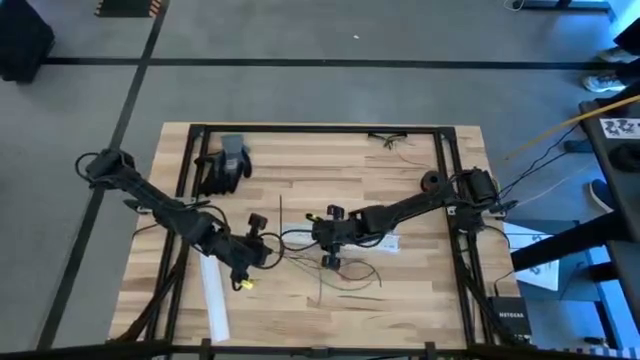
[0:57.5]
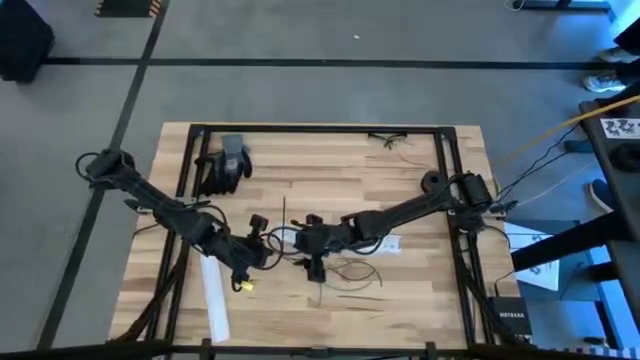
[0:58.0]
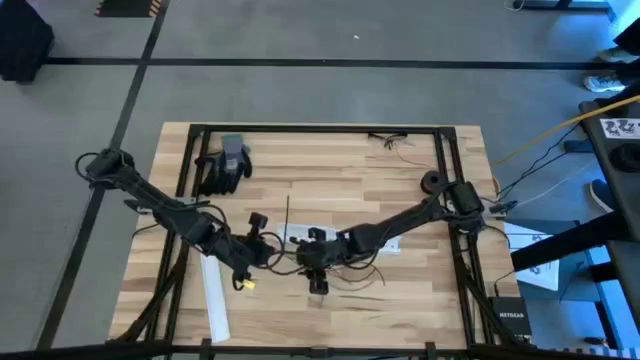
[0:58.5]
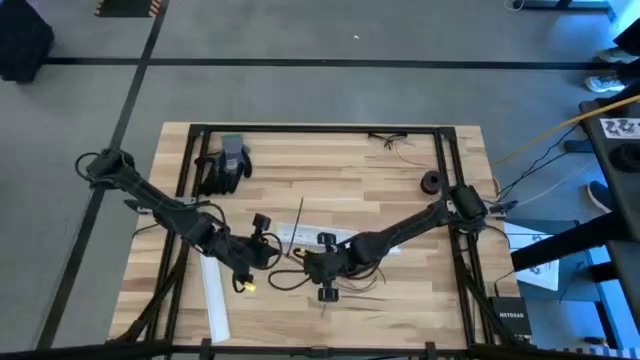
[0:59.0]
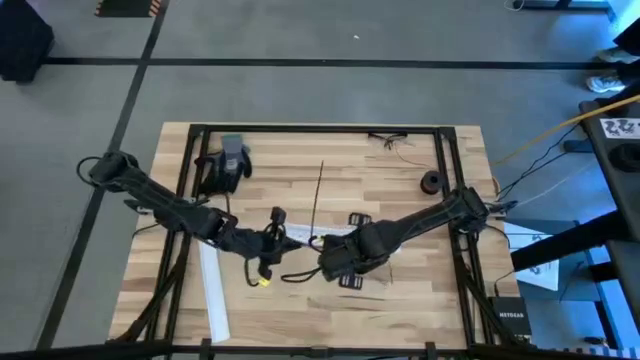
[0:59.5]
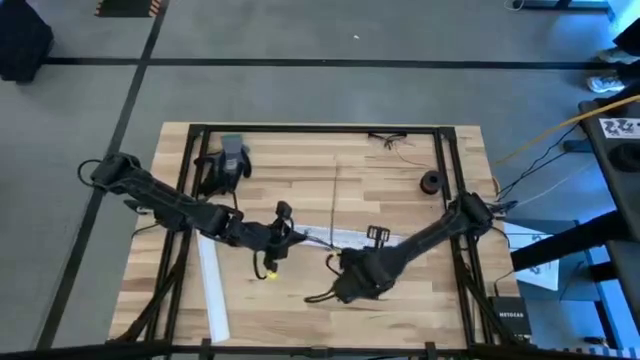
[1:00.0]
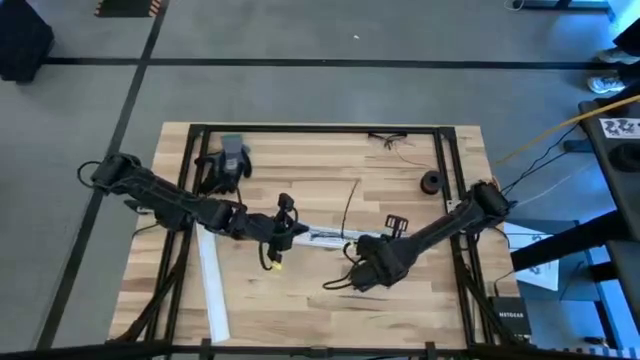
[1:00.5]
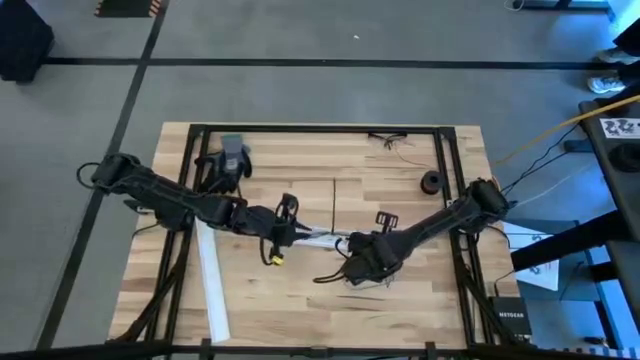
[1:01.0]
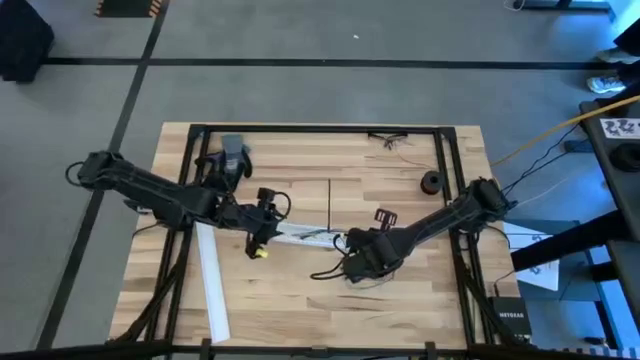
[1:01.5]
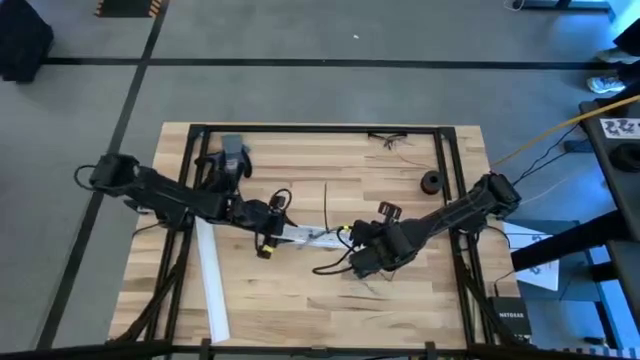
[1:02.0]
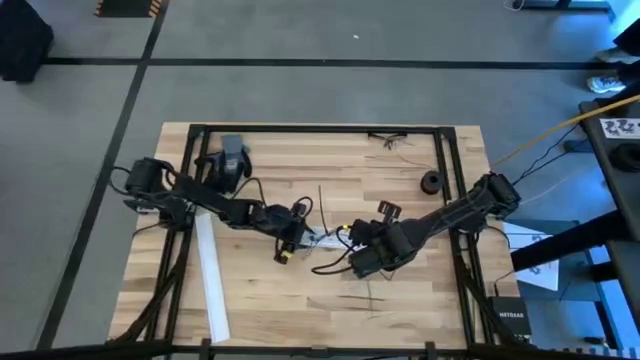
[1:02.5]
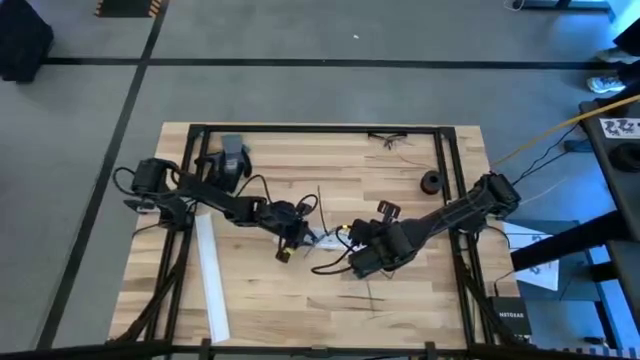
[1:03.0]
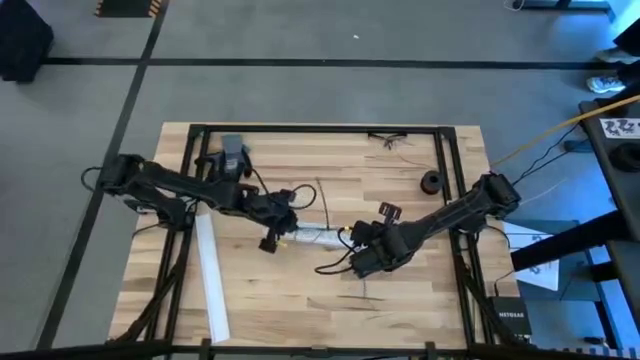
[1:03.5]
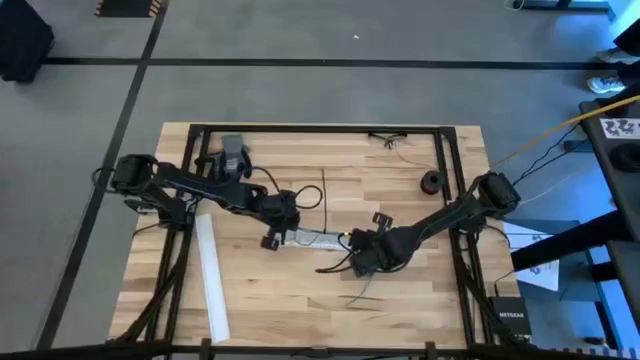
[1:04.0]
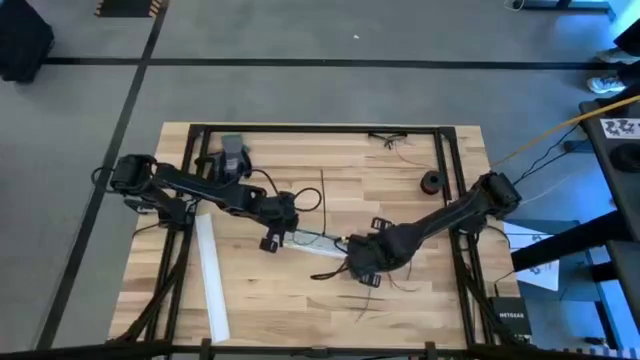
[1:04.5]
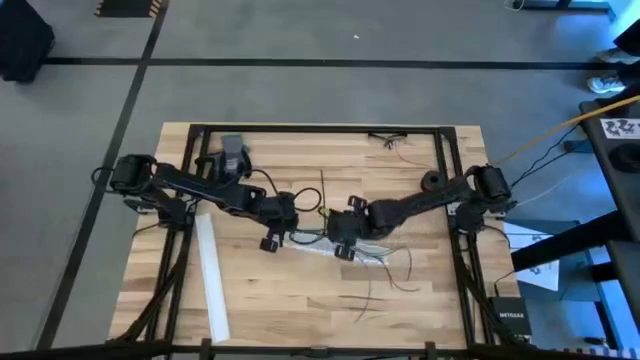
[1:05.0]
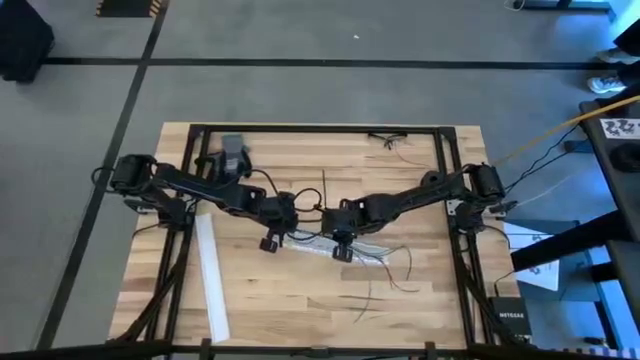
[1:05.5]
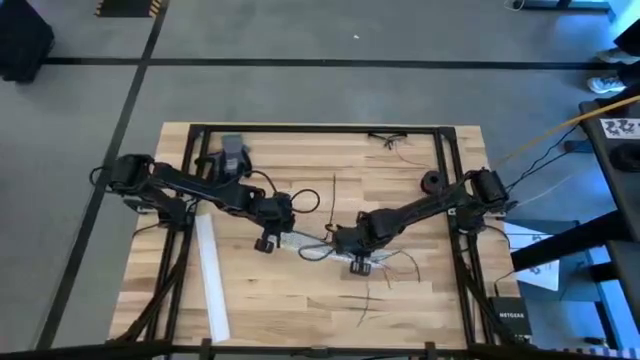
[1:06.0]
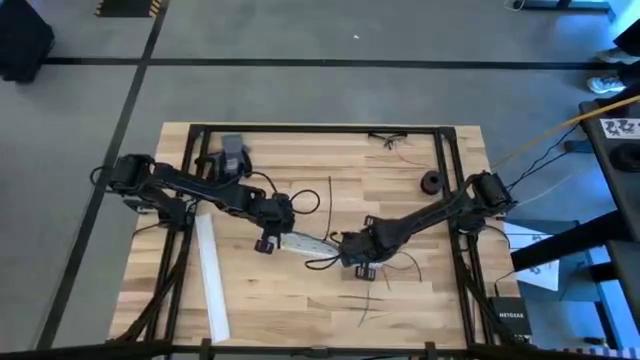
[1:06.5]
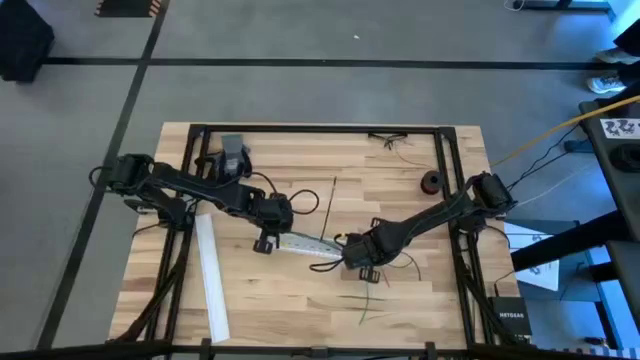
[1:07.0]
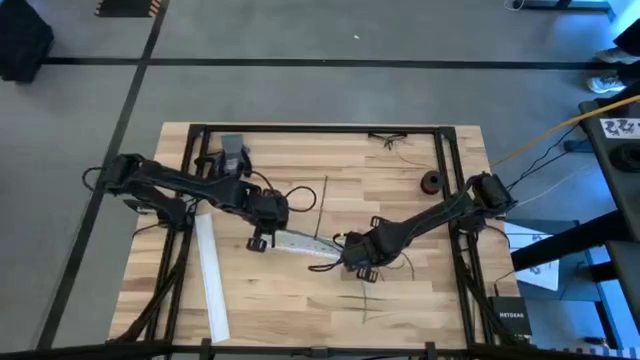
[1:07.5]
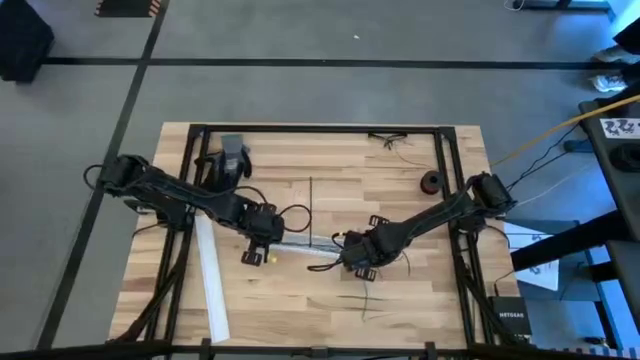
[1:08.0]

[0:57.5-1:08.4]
Task: Ziptie cables
Put the zip tied cable wires into the white cable duct

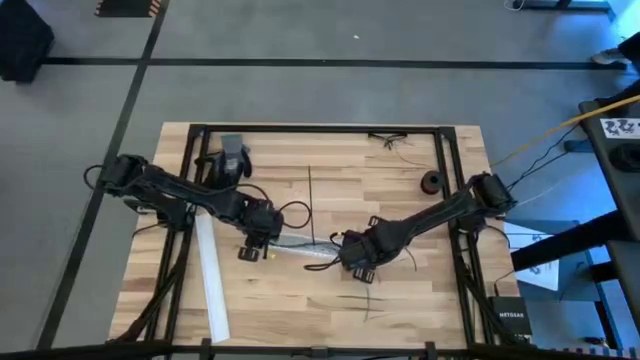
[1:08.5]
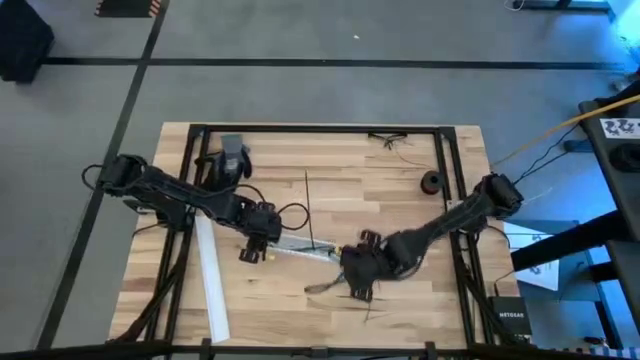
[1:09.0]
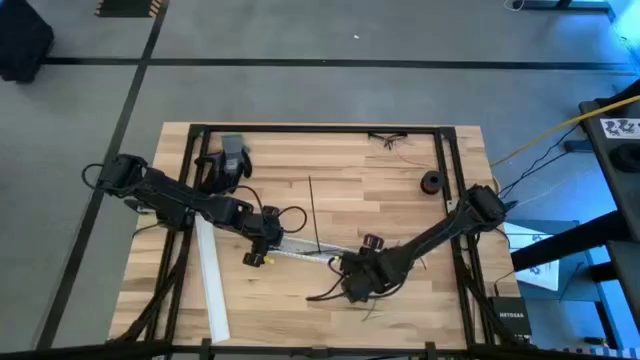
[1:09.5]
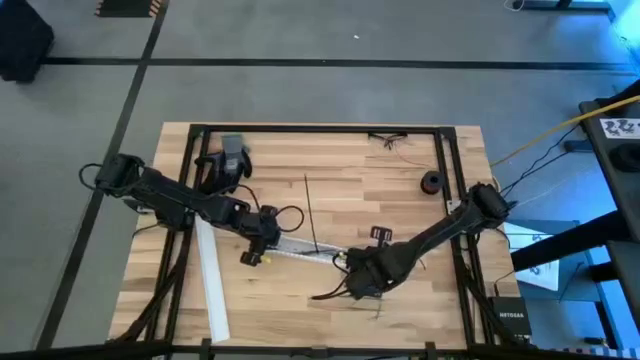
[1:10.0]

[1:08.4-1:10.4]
Put the zip tied cable wires into the white cable duct

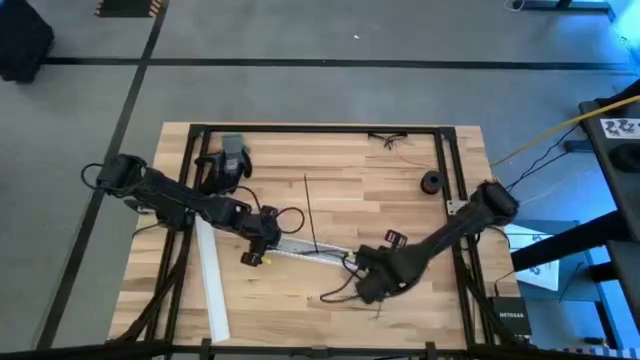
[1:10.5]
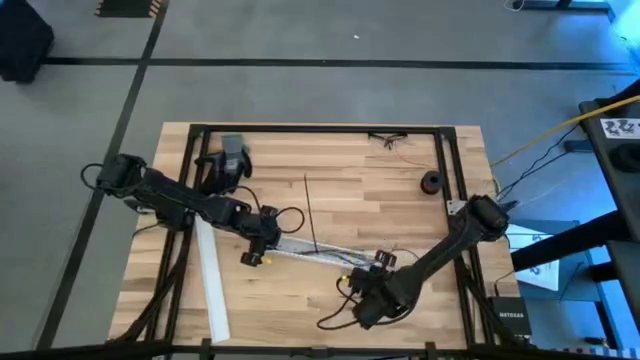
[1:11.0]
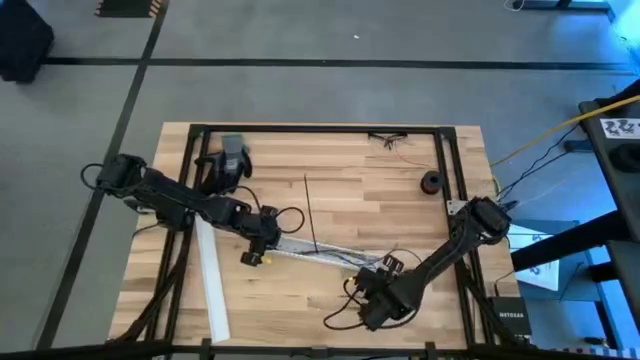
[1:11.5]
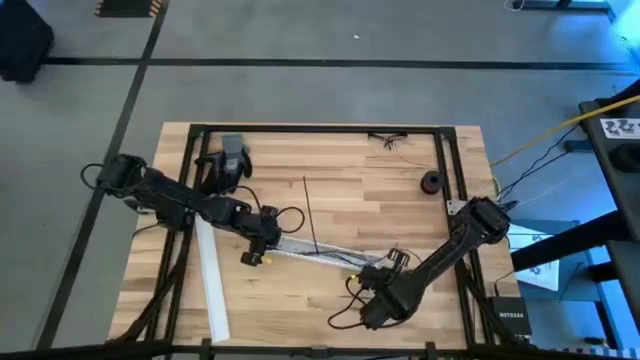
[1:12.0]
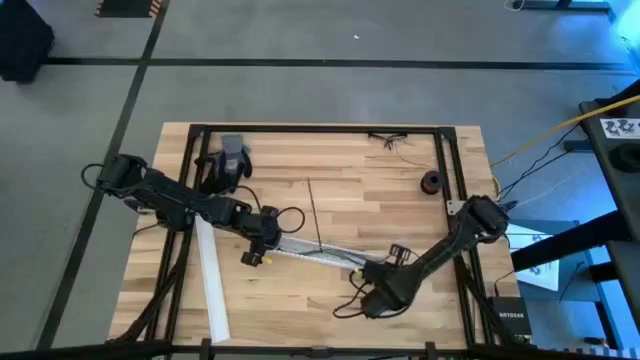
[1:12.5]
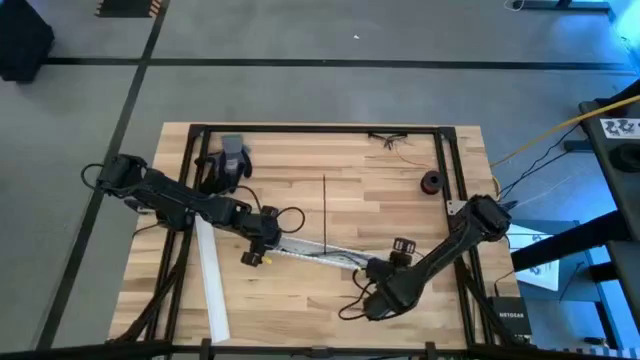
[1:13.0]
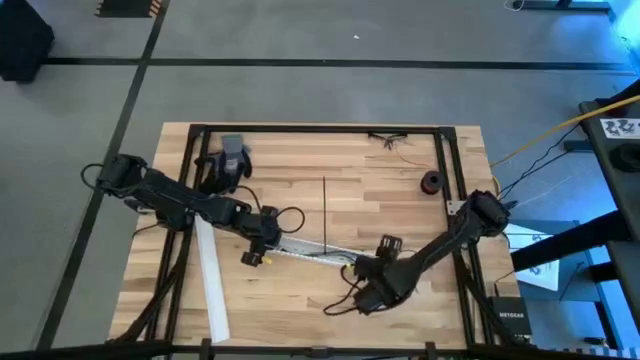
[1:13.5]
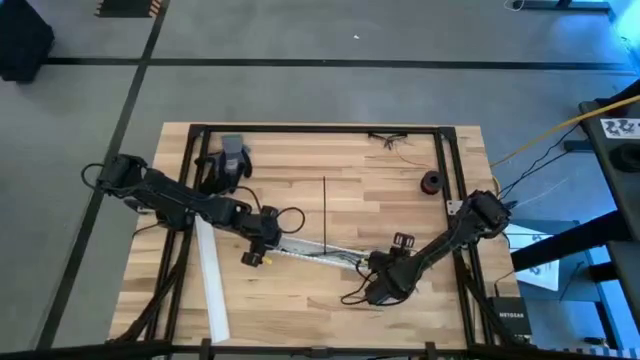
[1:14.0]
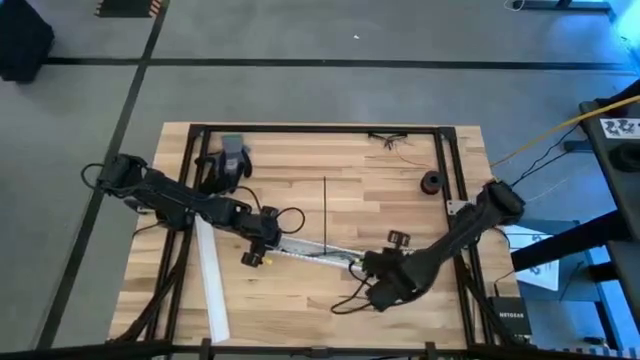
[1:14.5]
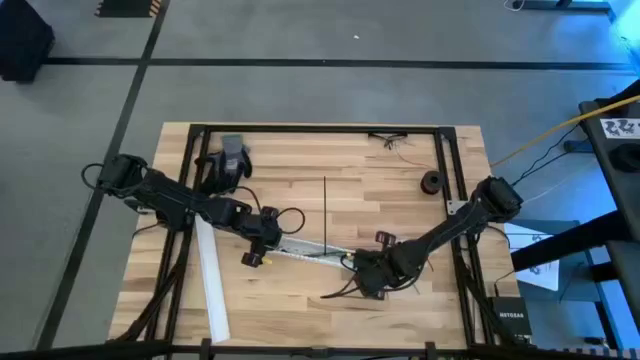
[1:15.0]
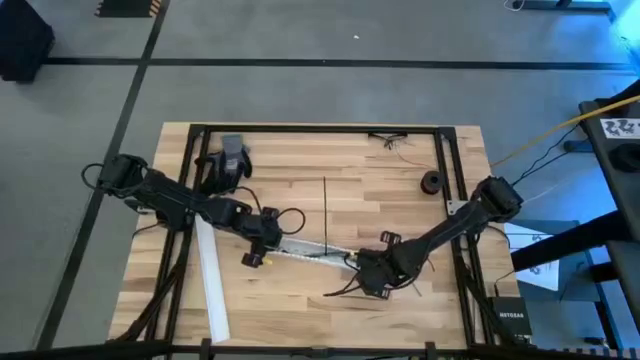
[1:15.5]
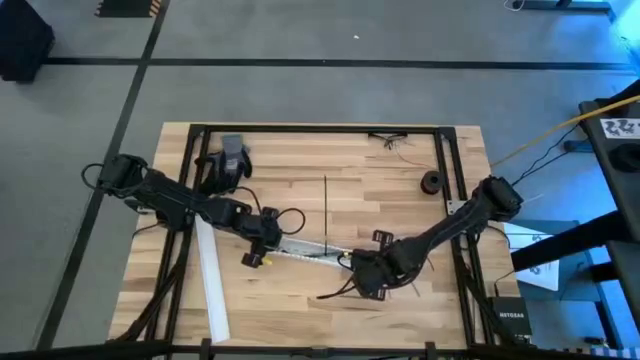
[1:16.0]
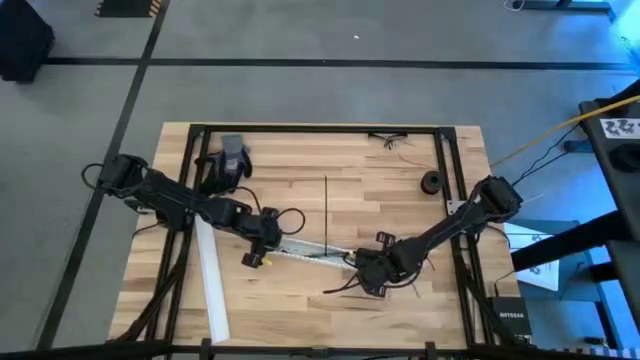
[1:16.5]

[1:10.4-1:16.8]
Put the zip tied cable wires into the white cable duct

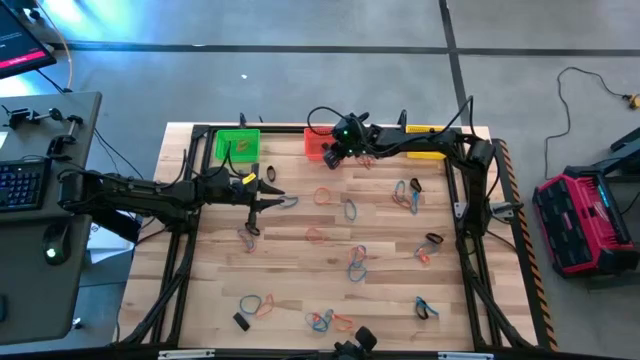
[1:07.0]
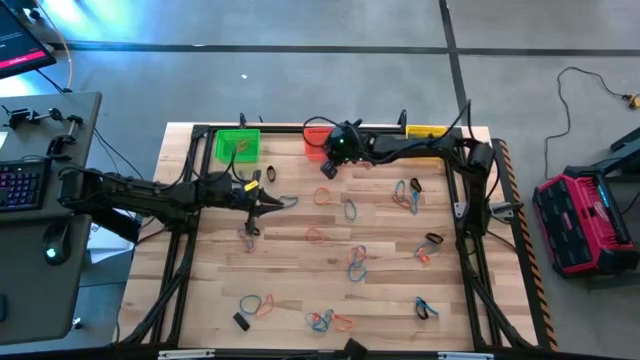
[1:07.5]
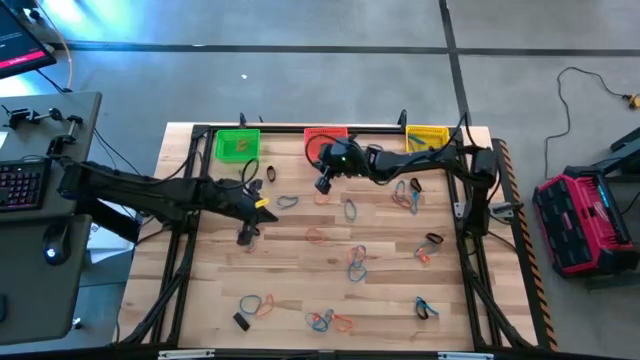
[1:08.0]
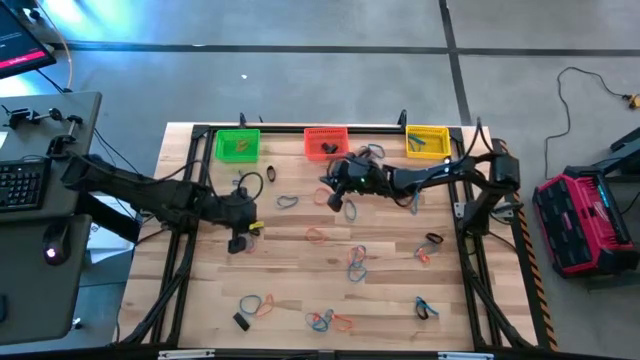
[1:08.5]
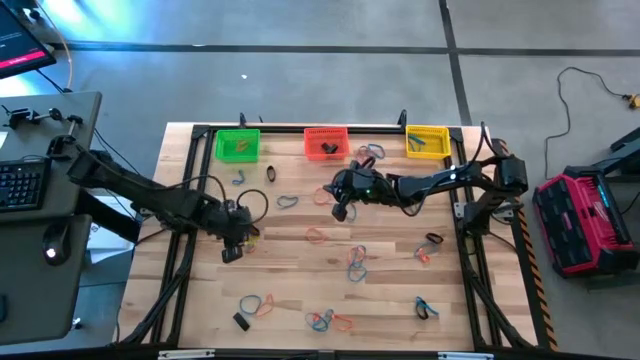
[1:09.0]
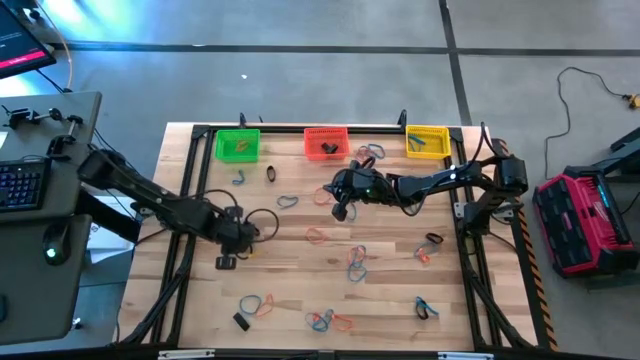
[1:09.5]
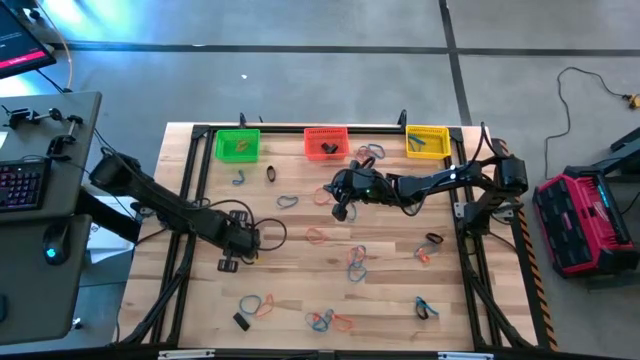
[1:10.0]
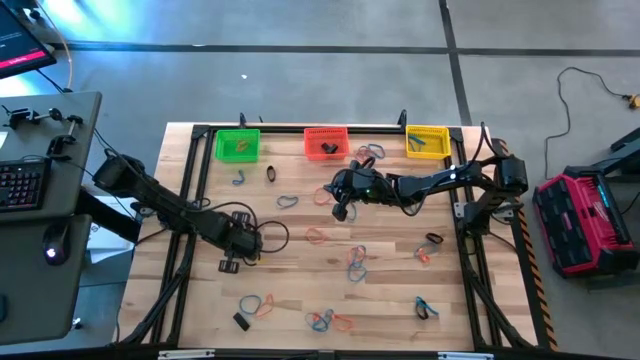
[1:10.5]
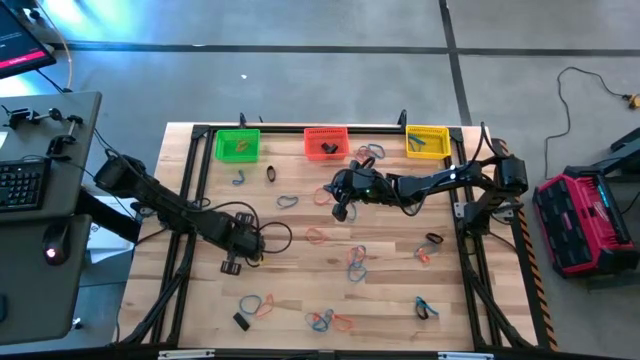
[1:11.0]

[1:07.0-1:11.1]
Task: Sort rubber bands into baskets
Put the orange rubber band into the green bin
